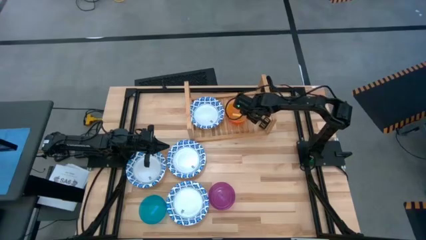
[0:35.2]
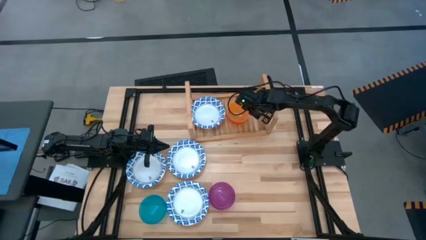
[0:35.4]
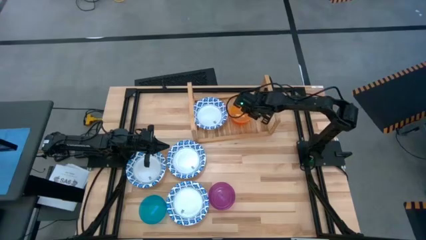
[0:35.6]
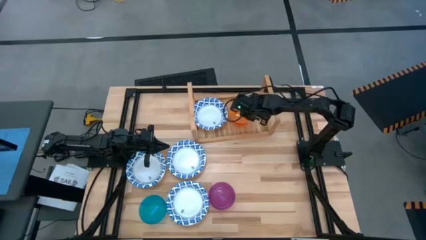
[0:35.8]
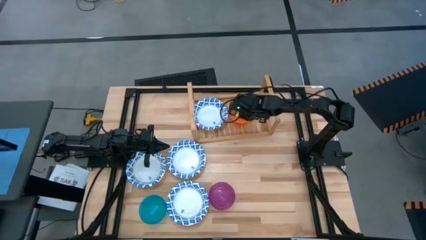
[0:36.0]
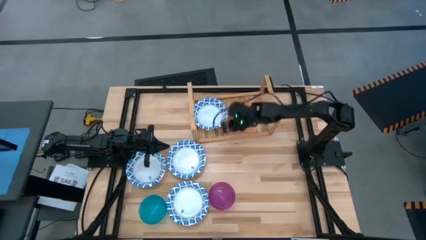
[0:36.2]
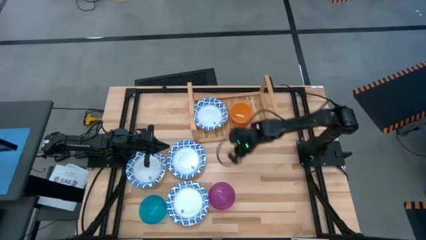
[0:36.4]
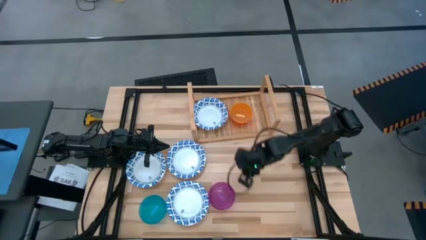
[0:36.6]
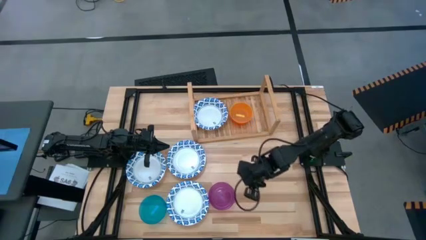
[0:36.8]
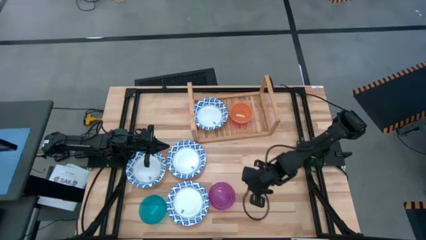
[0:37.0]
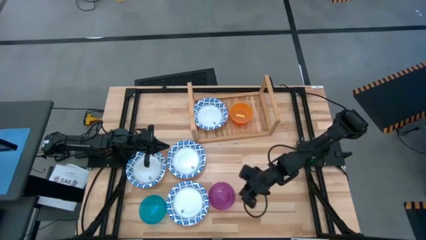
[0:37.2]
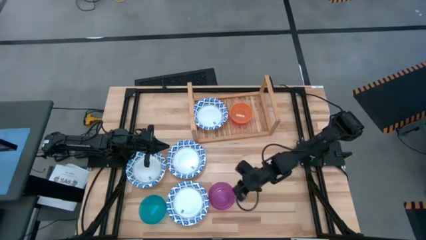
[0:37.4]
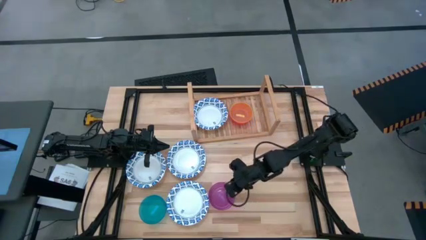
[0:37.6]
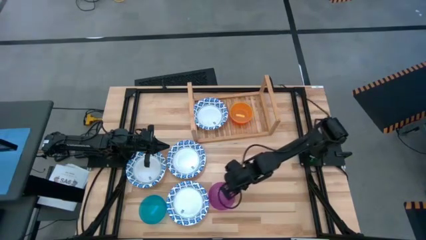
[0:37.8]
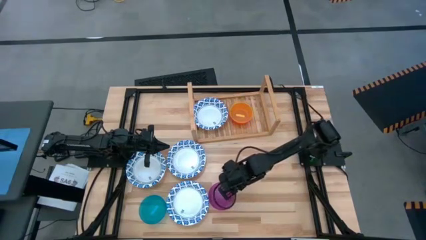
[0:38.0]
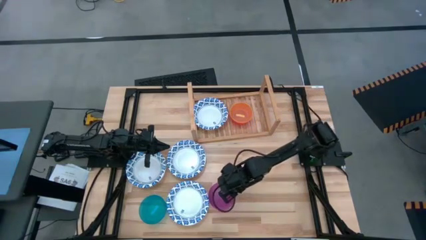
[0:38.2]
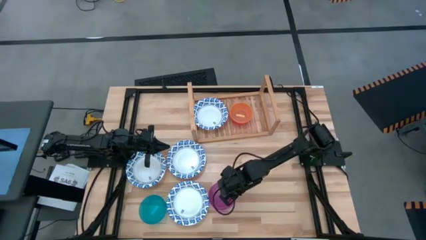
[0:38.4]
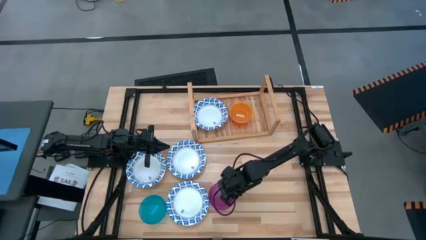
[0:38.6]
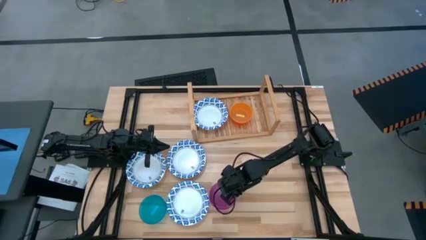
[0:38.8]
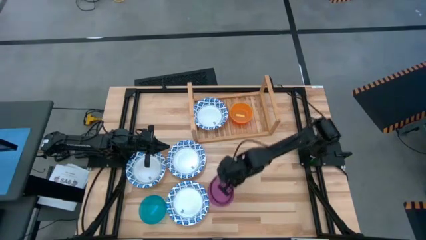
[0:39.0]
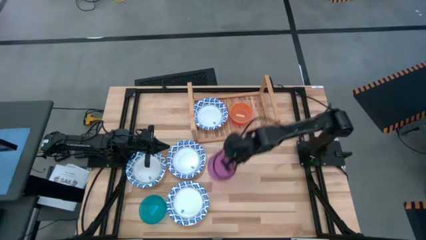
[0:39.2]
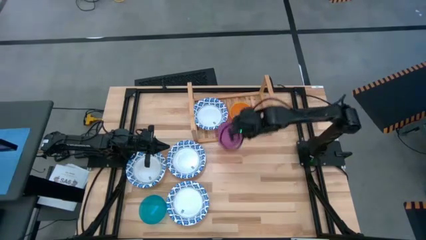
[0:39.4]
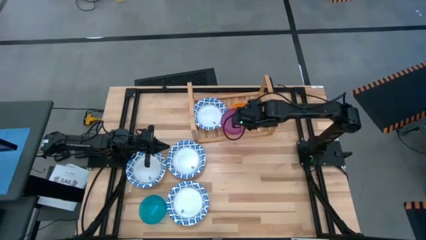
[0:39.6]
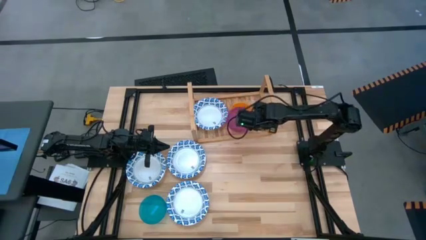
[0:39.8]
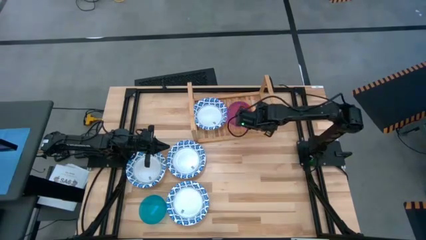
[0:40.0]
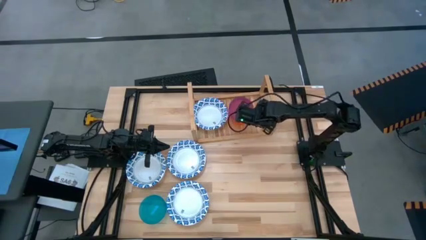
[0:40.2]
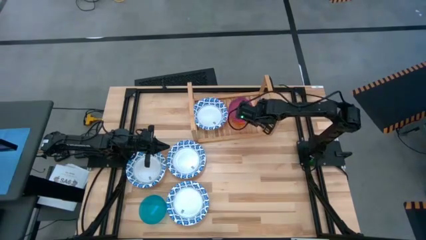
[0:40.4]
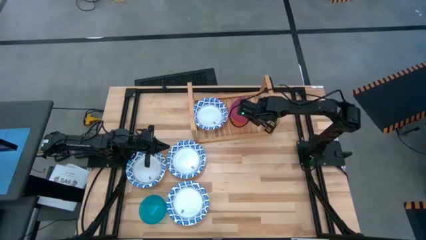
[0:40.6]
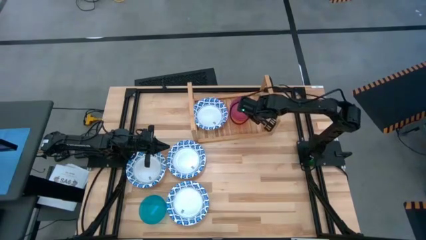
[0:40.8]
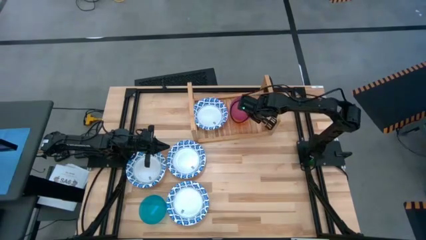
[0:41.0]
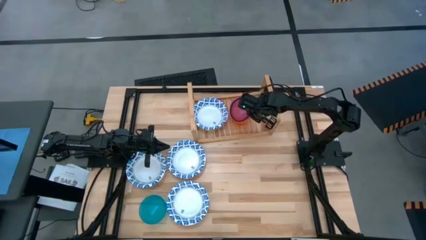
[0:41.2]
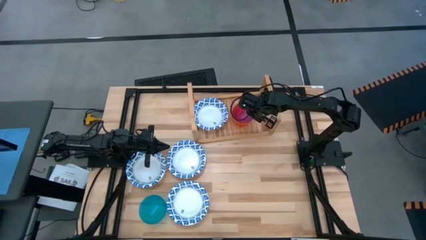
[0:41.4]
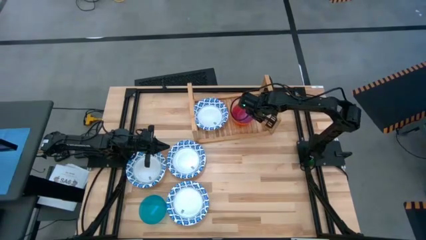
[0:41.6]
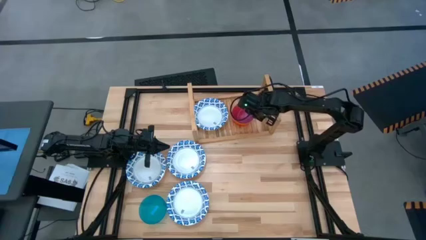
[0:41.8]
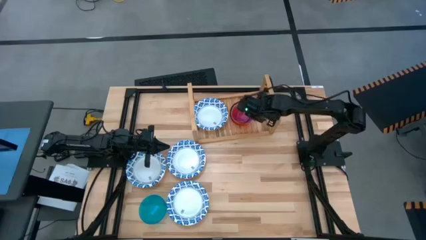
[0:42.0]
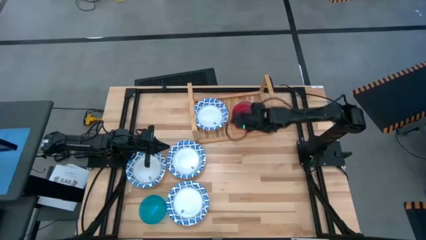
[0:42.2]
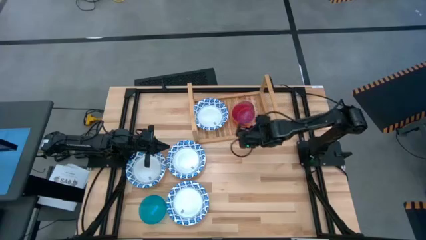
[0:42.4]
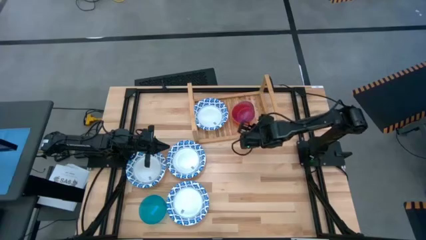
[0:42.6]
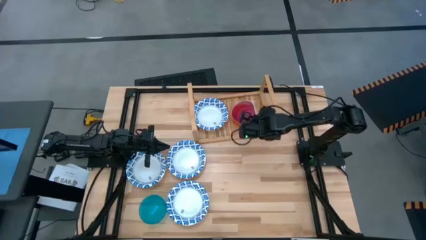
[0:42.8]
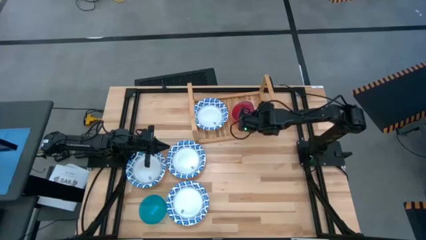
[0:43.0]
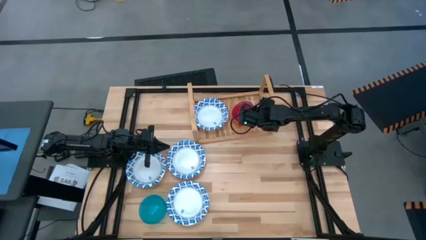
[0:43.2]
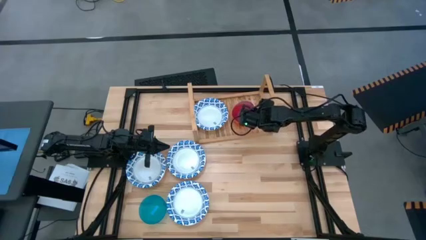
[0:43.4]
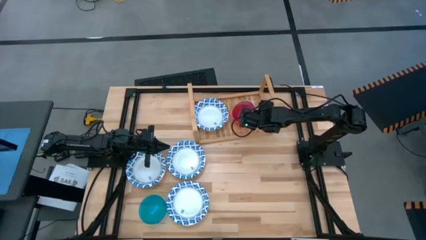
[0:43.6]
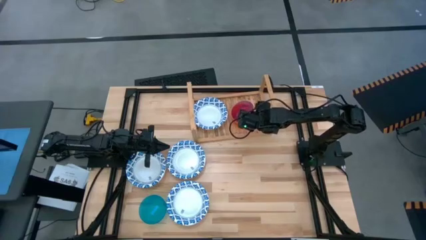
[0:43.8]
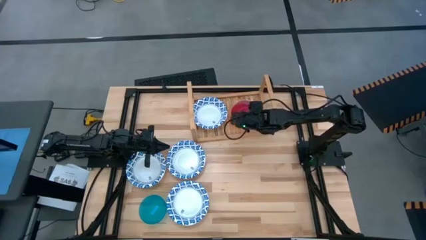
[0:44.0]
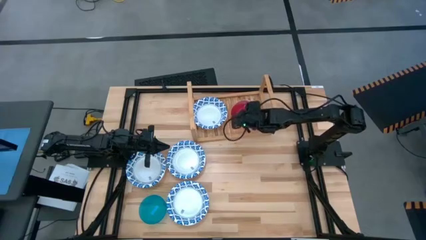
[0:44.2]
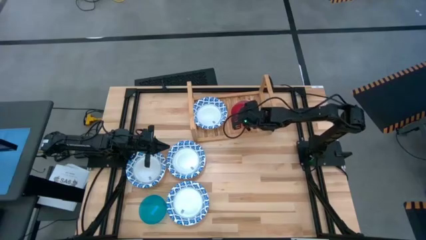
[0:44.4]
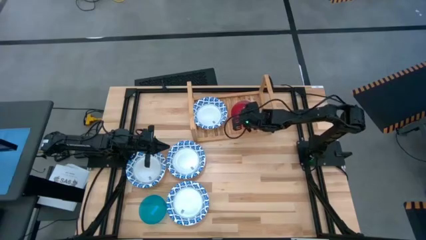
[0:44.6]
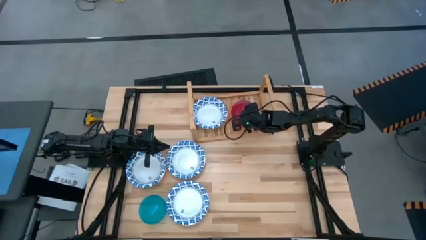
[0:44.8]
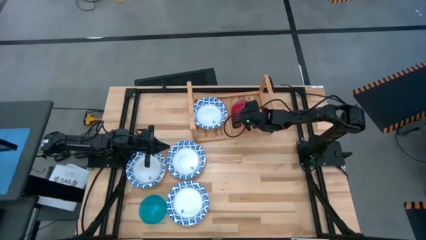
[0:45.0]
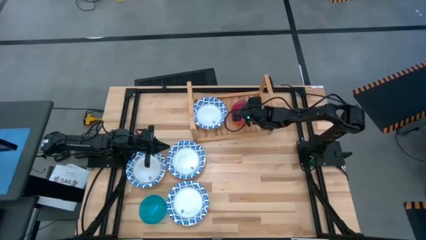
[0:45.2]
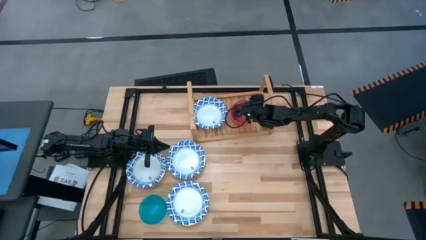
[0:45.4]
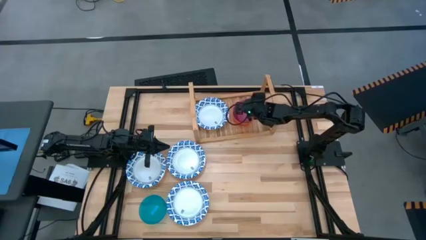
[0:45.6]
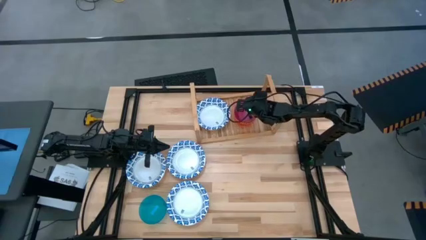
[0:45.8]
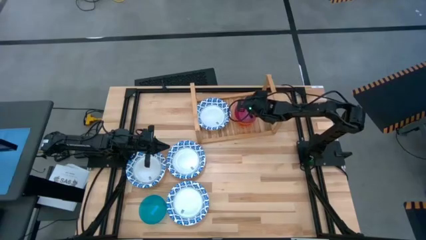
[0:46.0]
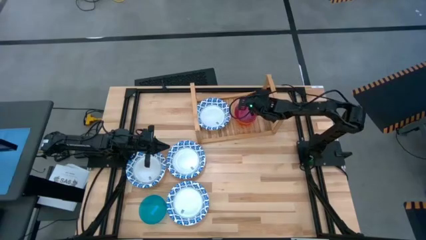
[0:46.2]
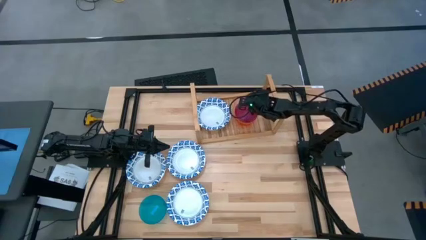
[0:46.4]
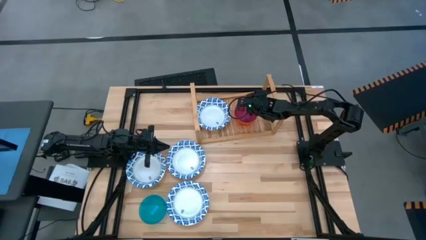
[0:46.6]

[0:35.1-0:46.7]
Task: Place and stack bowls onto a shelf
Stack the purple transparent bowl on top of the yellow transparent bowl on the shelf

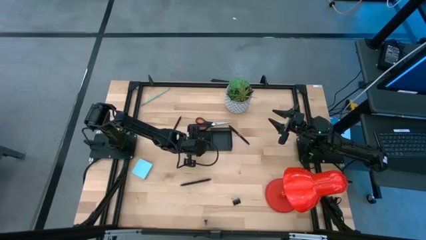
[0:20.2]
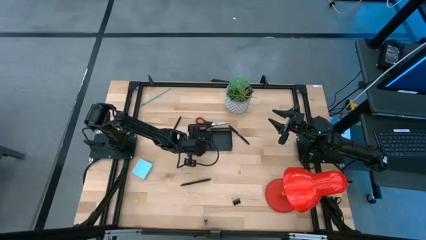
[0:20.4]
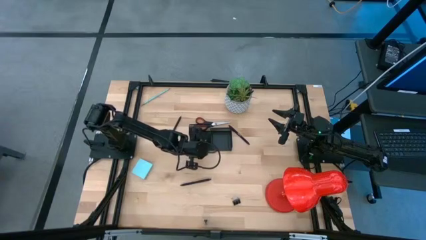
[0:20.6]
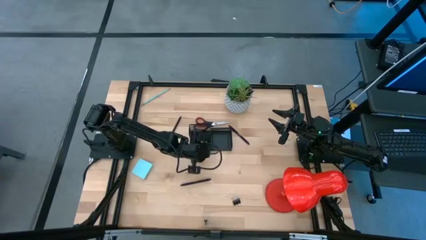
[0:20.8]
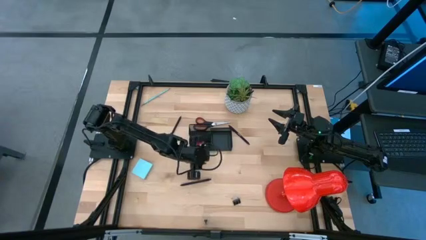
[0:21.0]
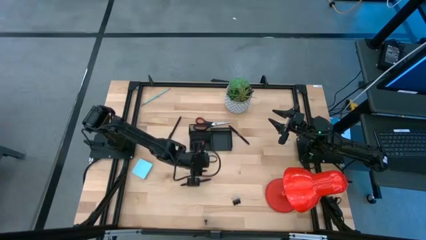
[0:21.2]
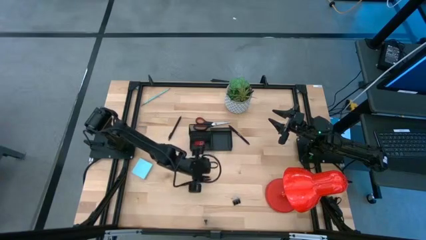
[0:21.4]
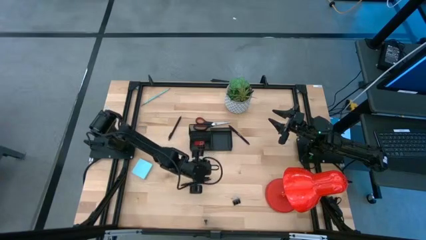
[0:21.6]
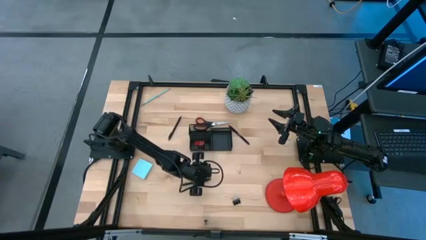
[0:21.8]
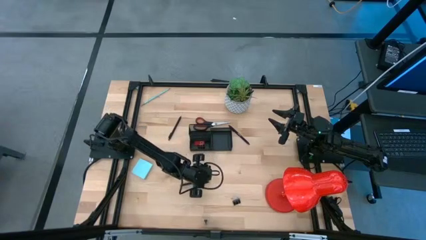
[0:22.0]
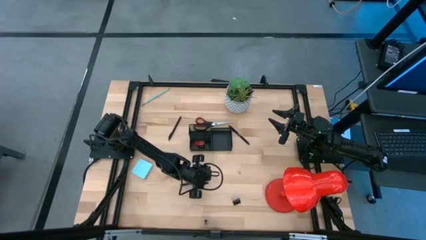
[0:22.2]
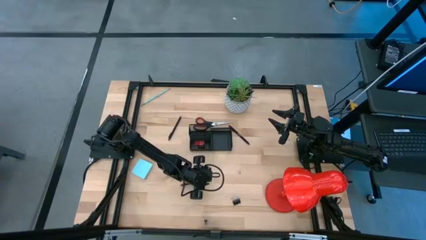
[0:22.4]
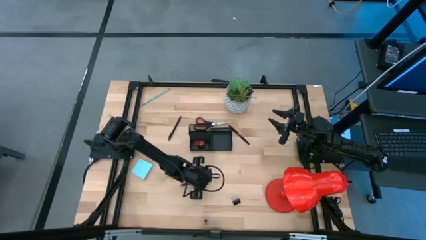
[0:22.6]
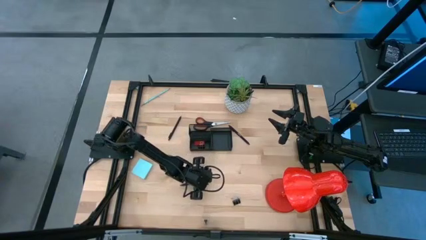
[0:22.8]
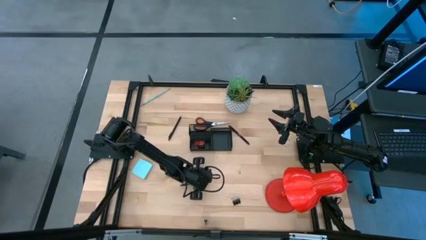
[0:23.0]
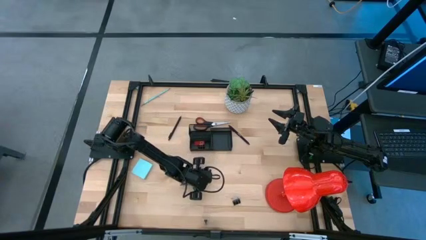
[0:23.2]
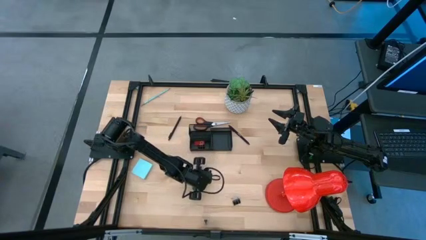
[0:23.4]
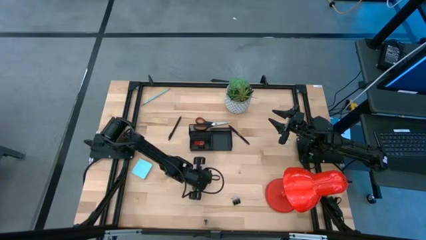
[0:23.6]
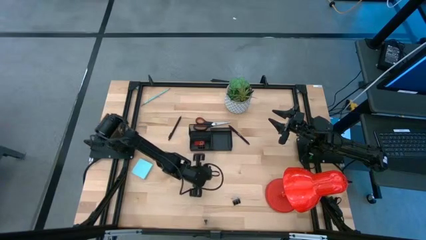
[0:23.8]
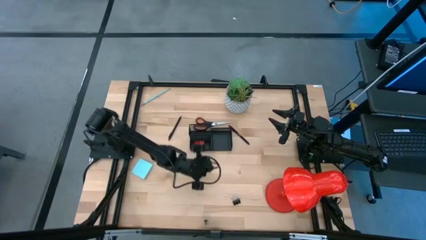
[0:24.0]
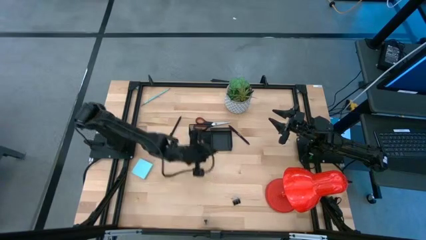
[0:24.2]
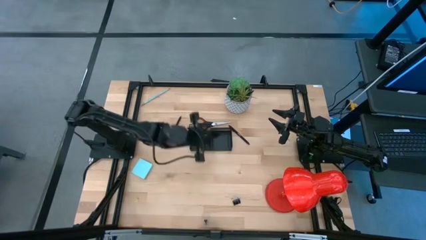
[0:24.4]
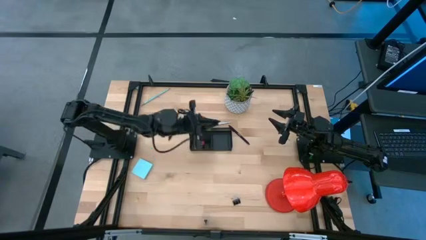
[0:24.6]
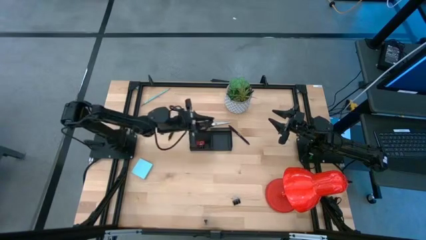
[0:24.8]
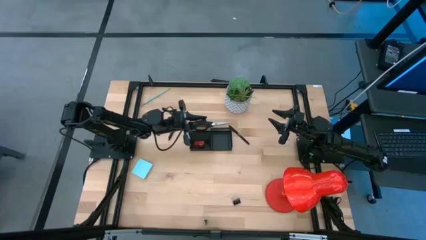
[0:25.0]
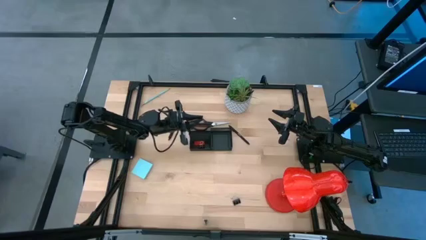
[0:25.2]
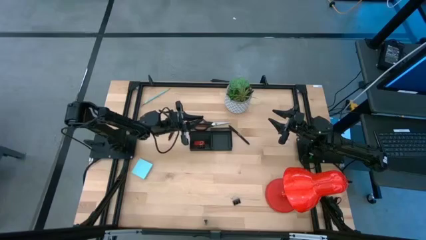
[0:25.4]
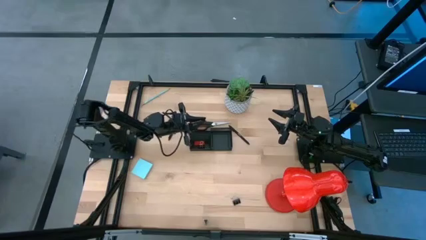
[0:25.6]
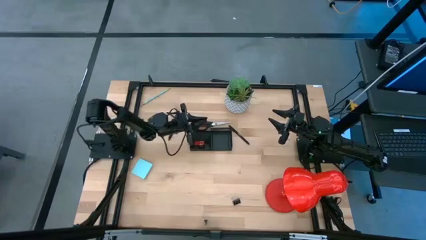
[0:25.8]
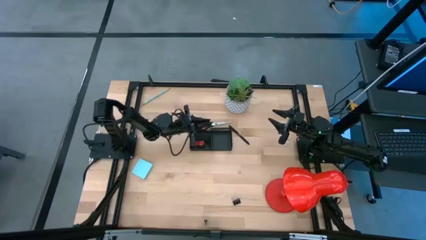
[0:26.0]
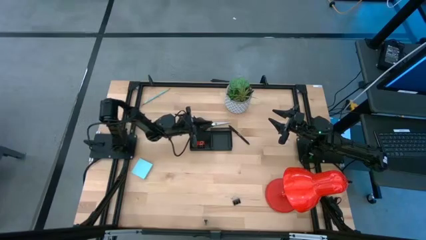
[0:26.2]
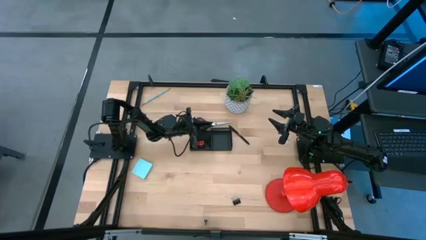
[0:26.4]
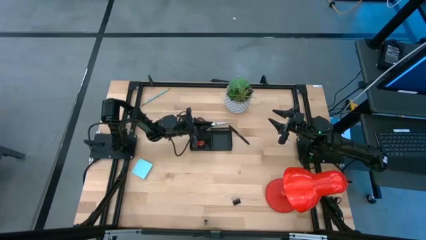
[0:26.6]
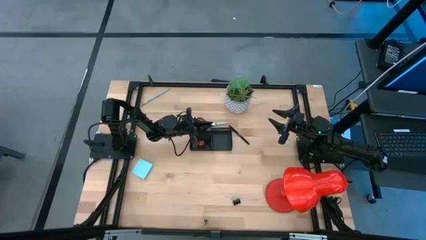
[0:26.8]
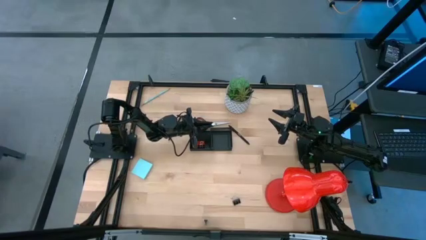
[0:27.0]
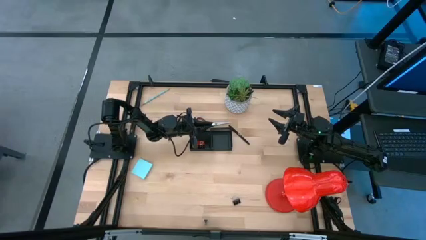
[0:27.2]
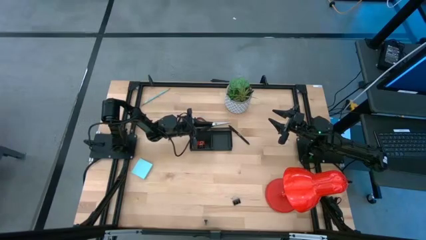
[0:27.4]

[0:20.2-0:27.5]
Task: Pick and place office supplies into organizer
Put the bottom pen into the top left section of the desk organizer
